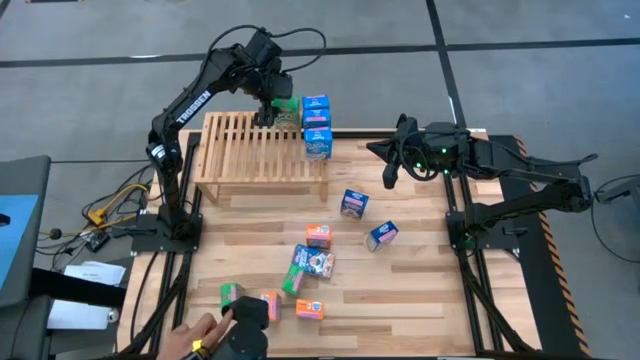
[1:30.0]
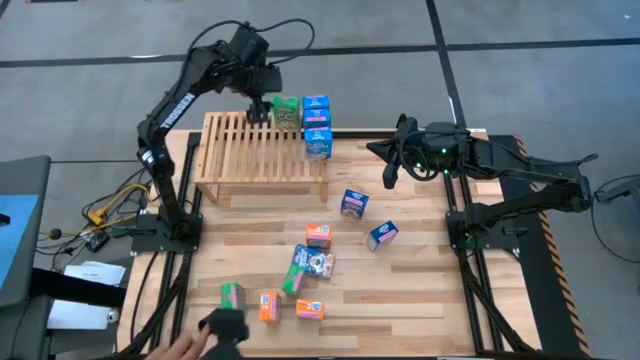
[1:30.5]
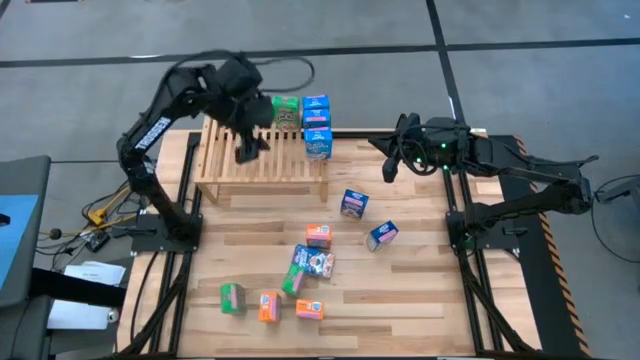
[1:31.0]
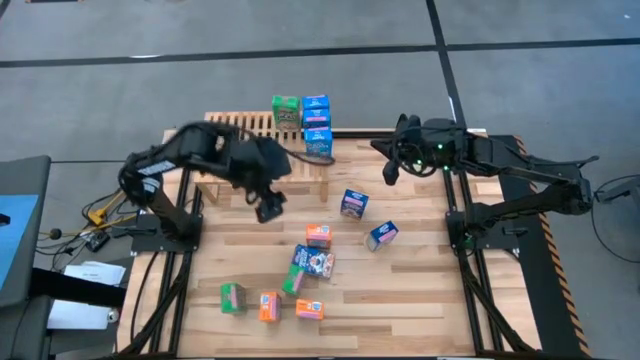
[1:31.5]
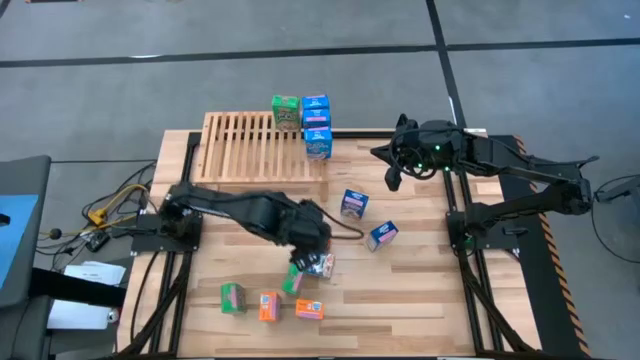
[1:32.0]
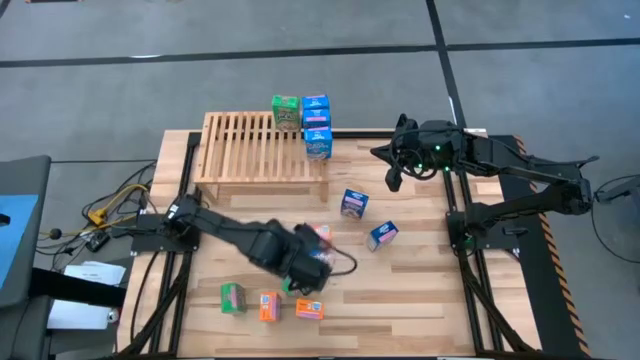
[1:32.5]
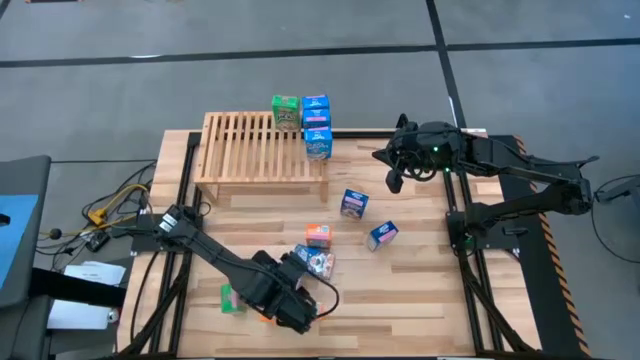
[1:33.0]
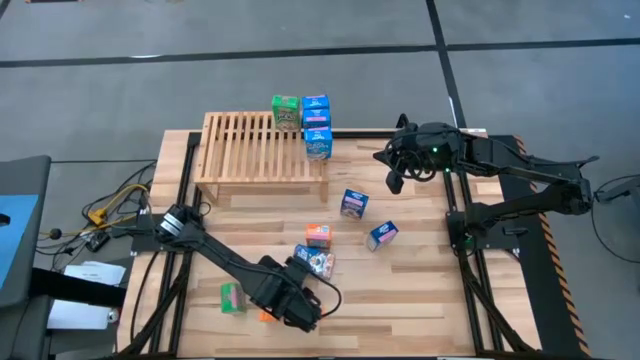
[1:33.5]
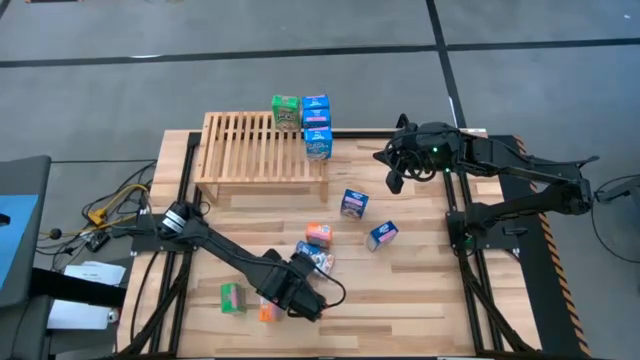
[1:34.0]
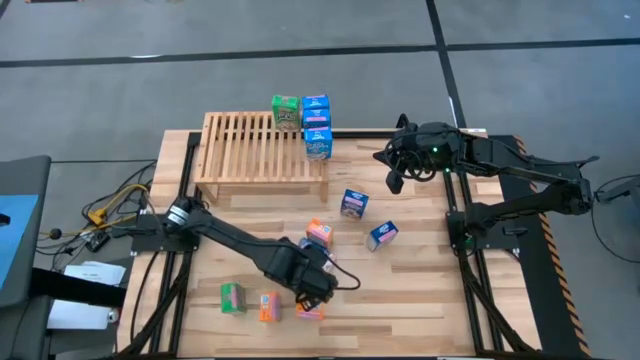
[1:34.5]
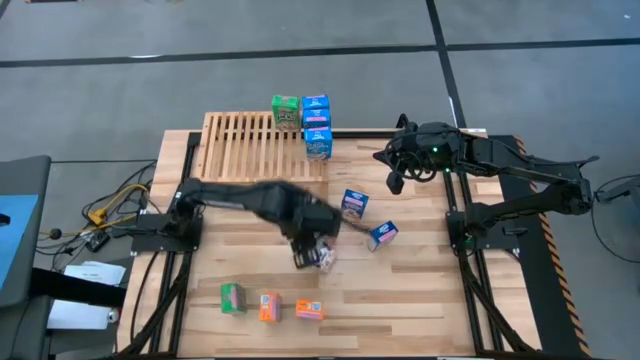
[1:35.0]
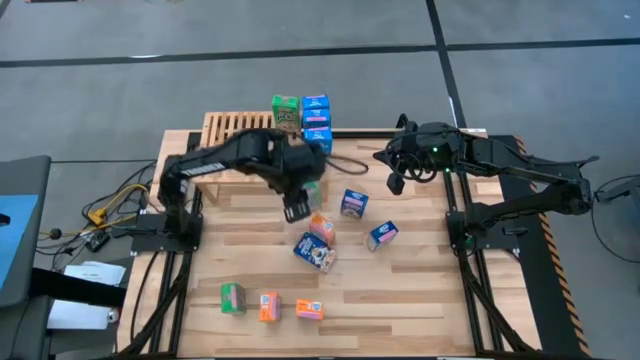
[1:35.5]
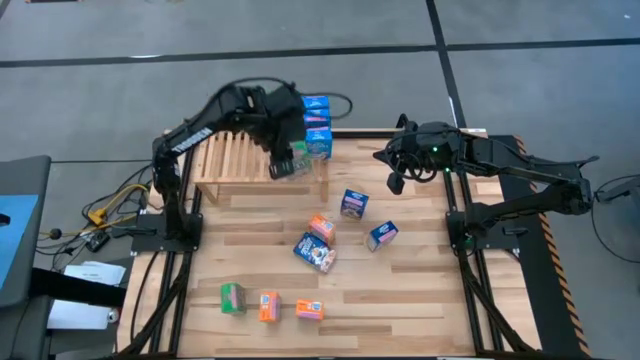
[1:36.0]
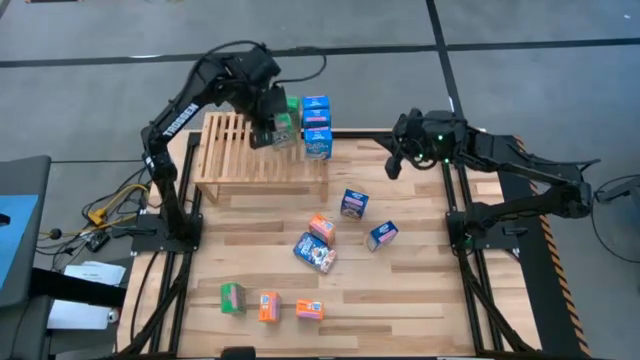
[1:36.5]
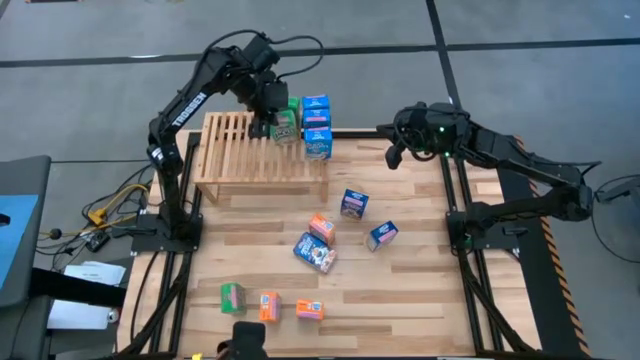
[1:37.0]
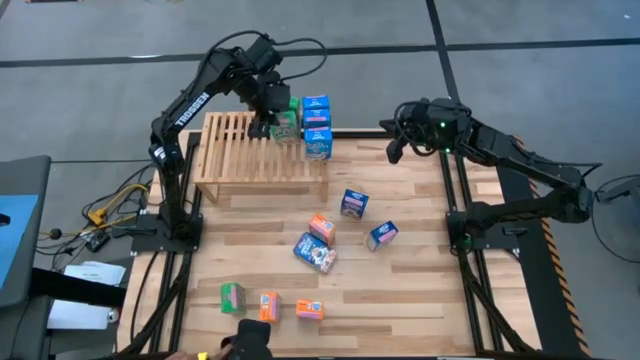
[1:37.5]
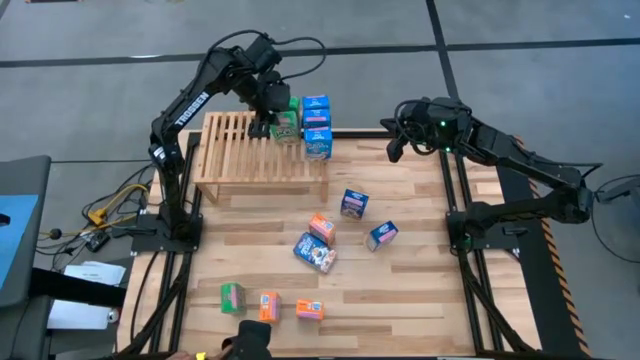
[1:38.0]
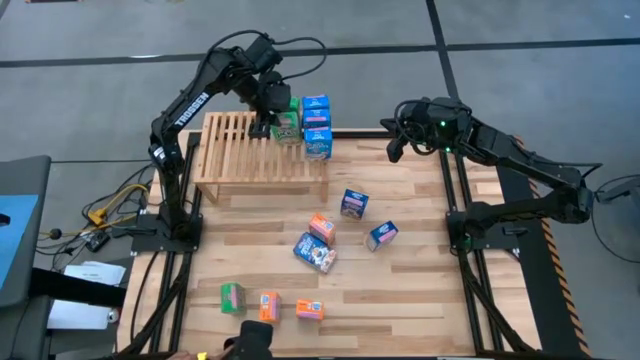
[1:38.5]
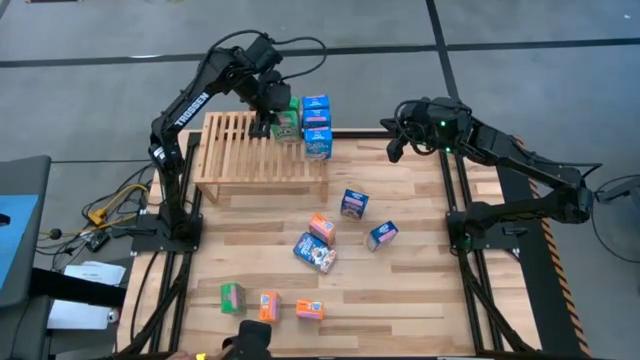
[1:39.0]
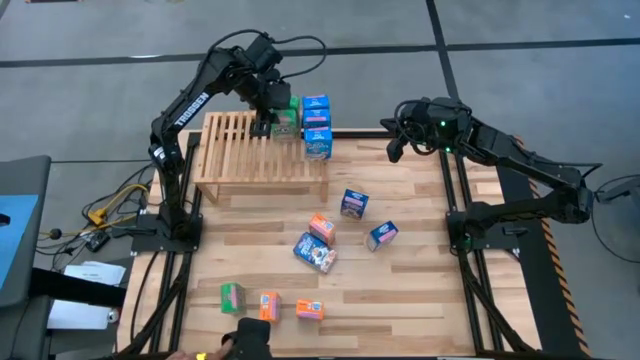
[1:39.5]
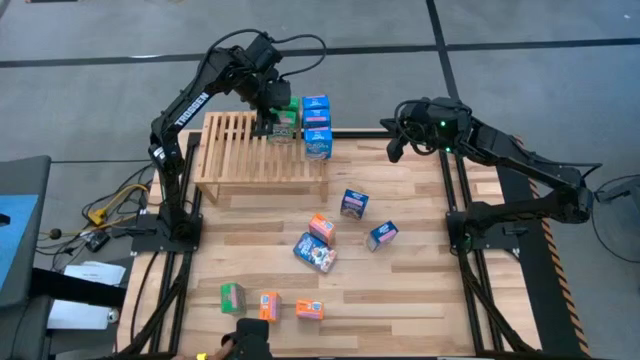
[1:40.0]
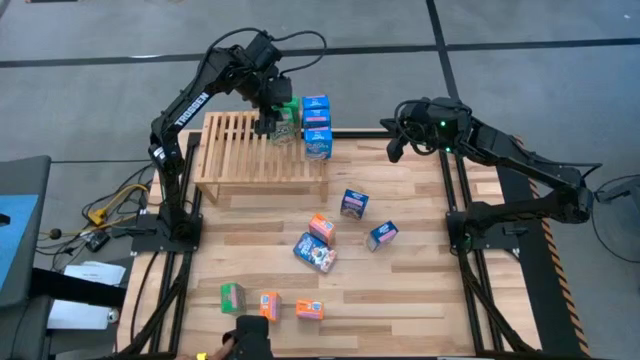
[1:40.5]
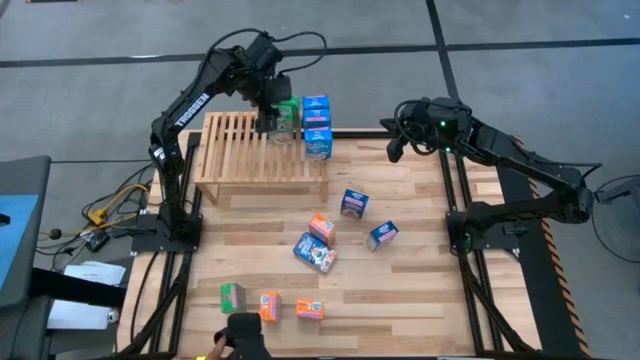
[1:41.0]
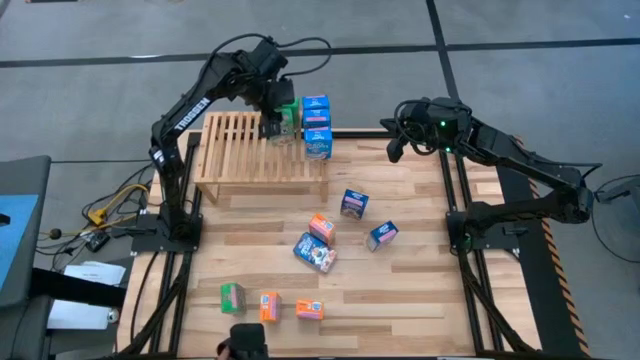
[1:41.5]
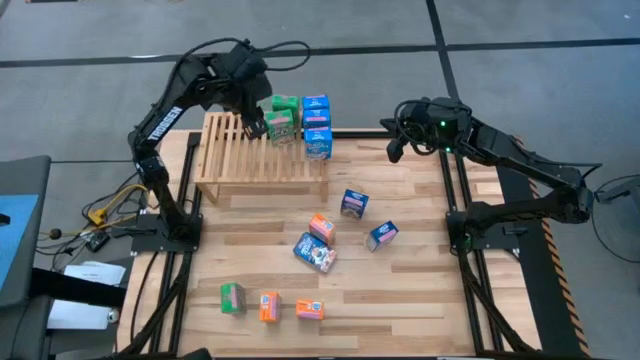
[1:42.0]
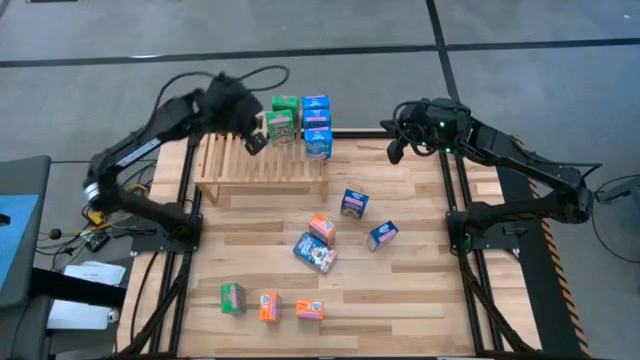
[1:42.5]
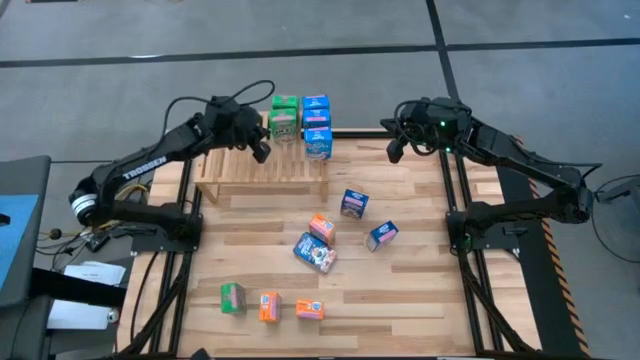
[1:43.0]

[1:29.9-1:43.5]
Task: Stack cereal on shelf
Put the right green cereal box on the shelf aligned with the other green cereal box

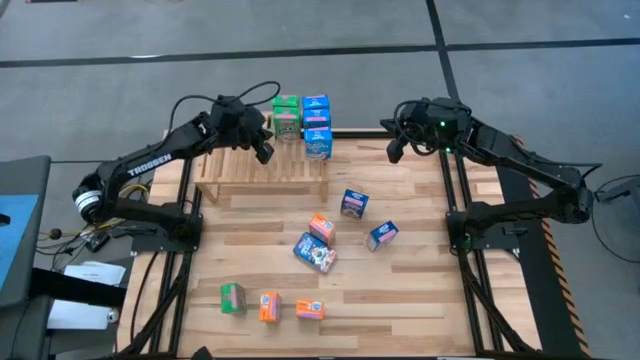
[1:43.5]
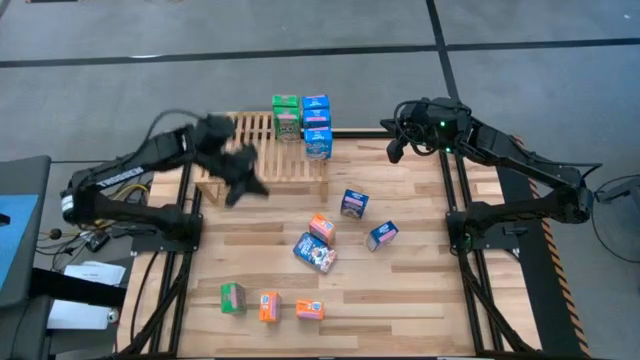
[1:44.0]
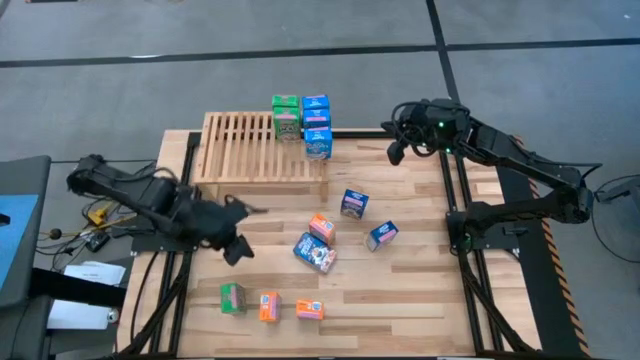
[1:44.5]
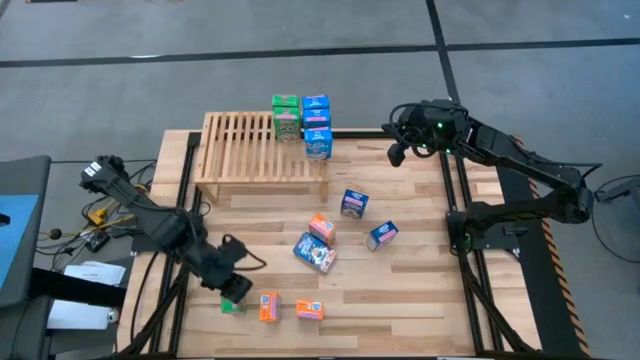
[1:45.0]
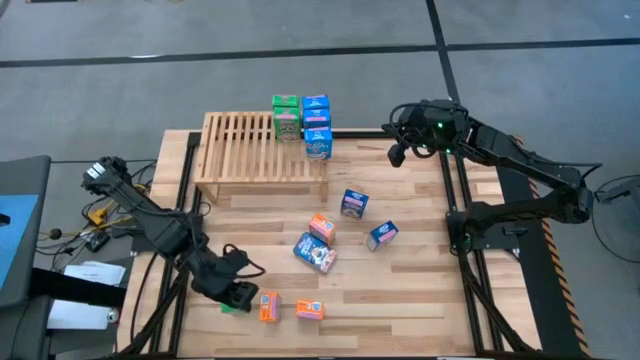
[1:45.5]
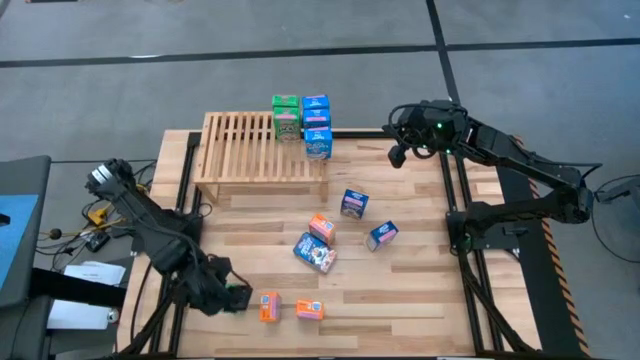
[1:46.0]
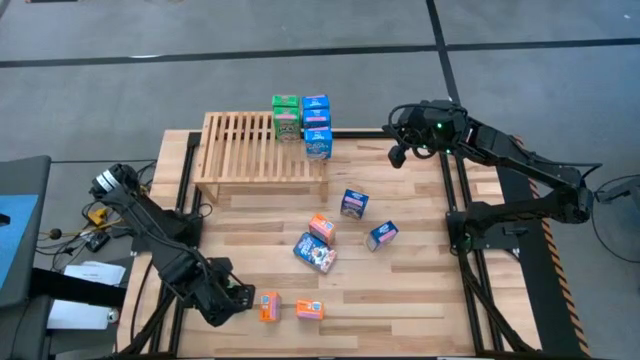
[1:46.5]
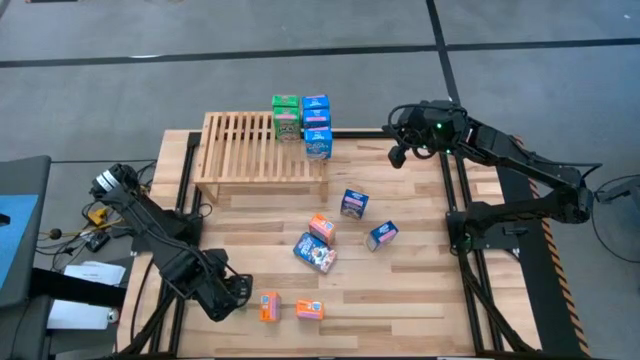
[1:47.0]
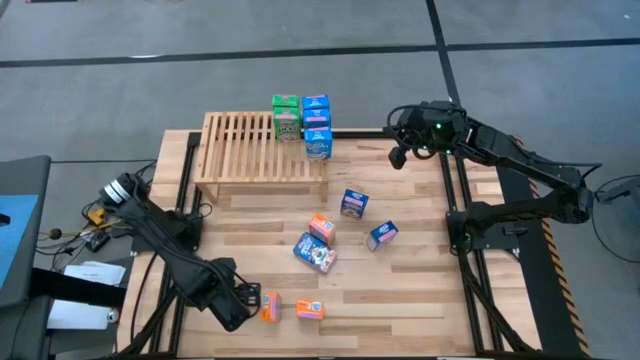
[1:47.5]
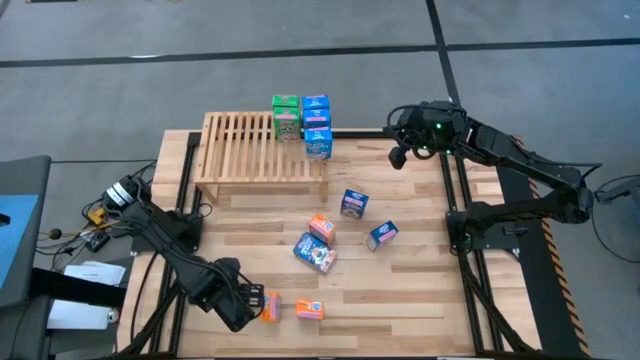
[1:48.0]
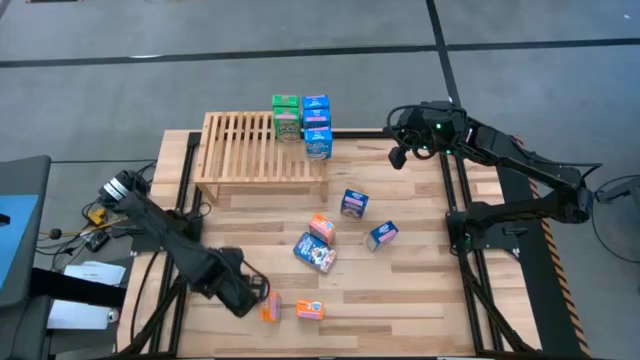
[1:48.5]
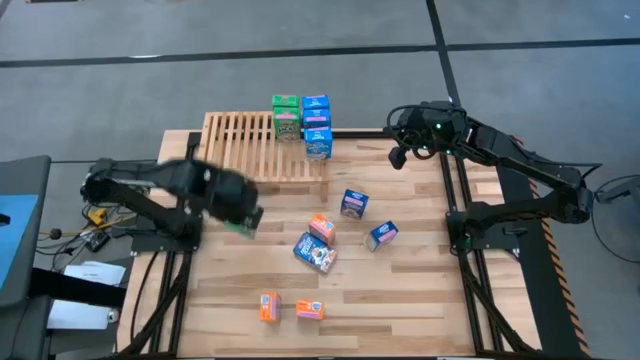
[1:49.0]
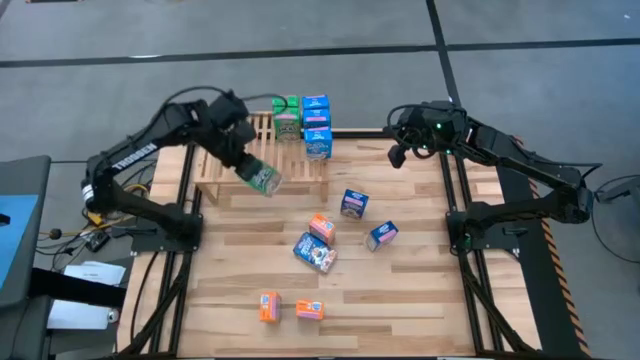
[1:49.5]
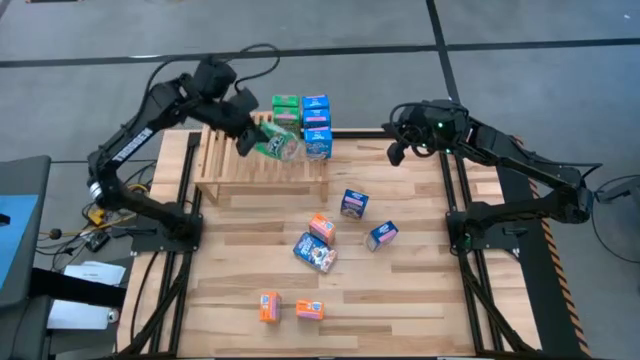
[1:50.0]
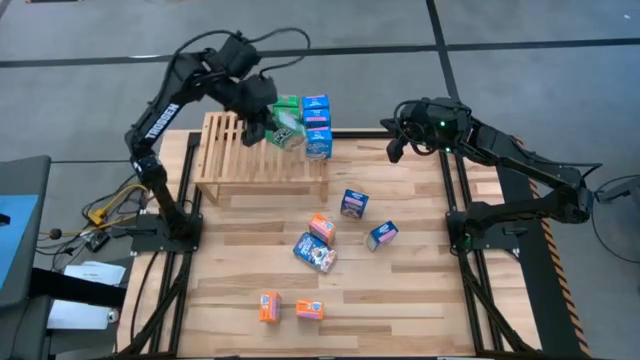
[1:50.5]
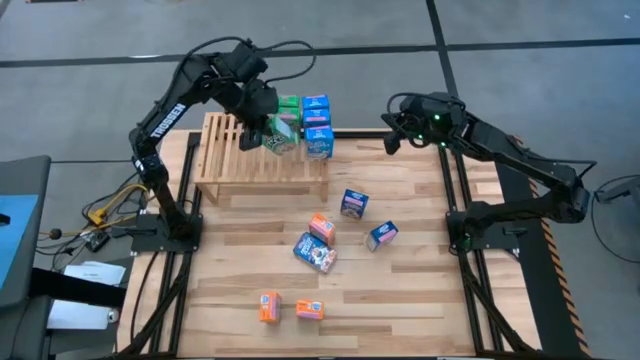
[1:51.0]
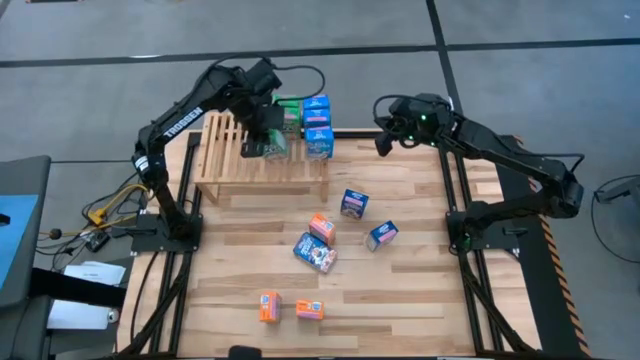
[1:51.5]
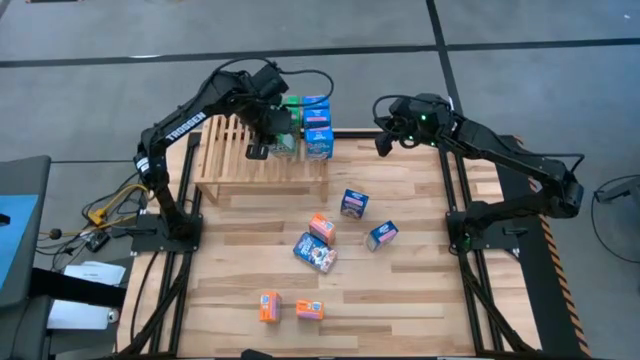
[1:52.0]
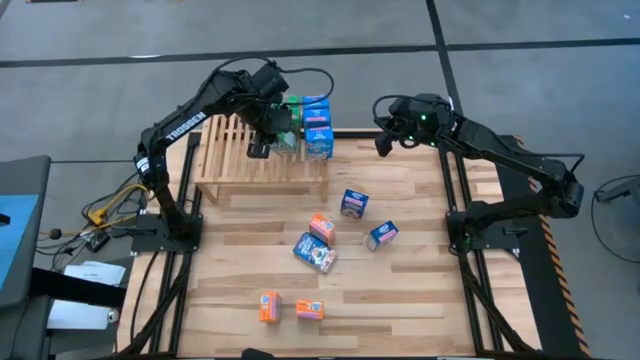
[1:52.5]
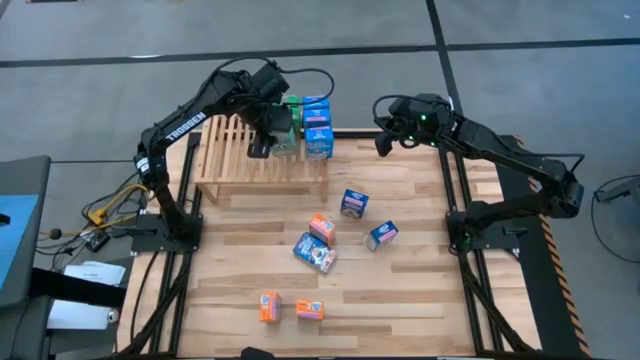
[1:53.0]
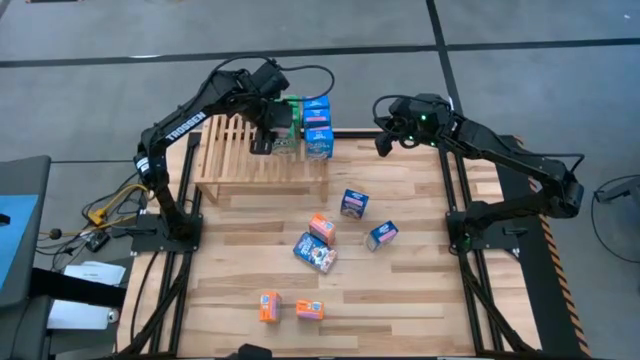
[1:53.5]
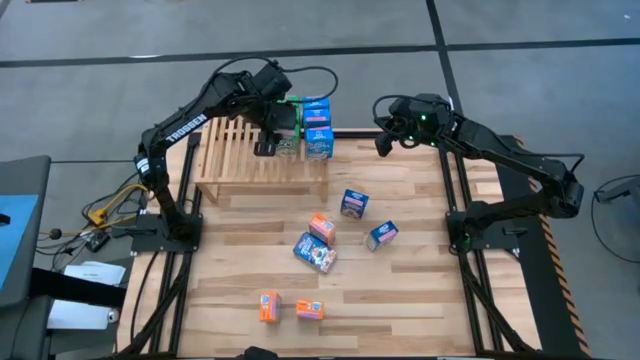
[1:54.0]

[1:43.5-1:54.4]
Put the green cereal box on the shelf aligned with the other green cereal boxes
